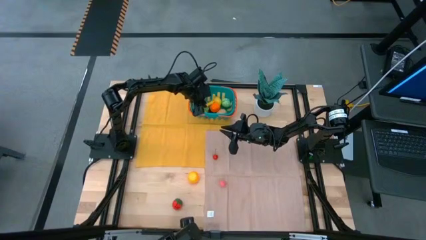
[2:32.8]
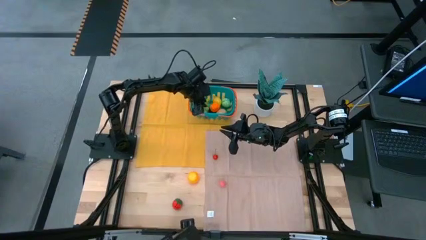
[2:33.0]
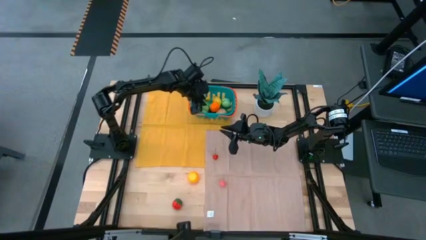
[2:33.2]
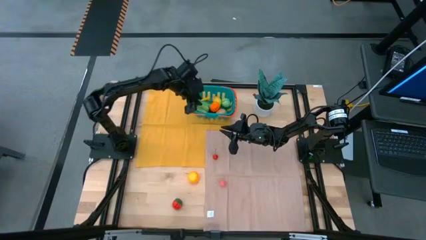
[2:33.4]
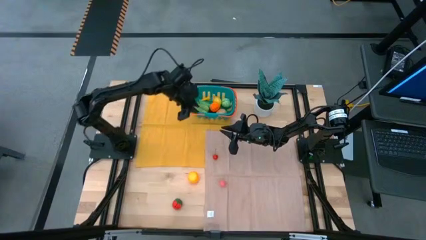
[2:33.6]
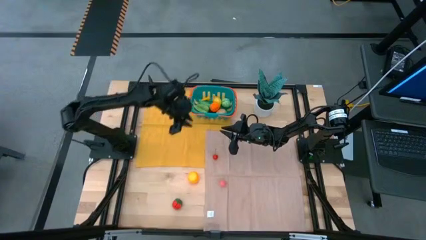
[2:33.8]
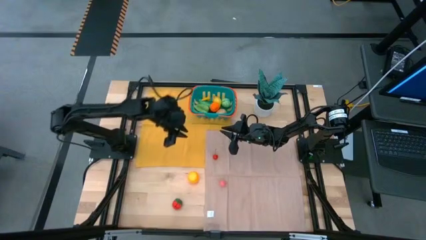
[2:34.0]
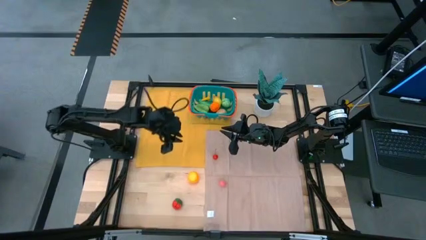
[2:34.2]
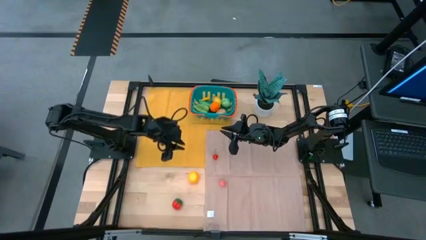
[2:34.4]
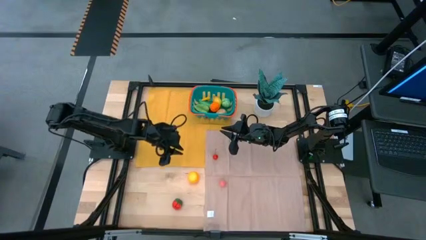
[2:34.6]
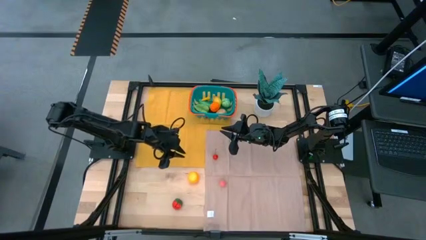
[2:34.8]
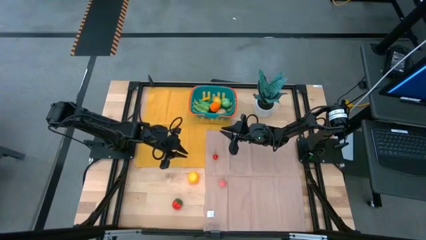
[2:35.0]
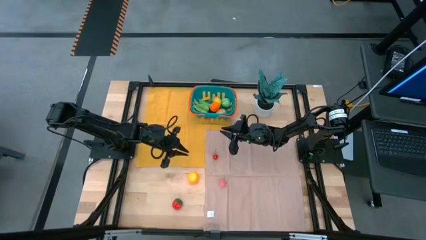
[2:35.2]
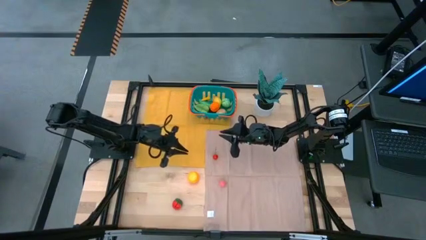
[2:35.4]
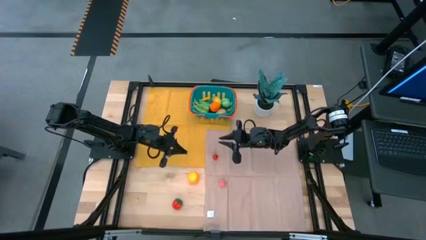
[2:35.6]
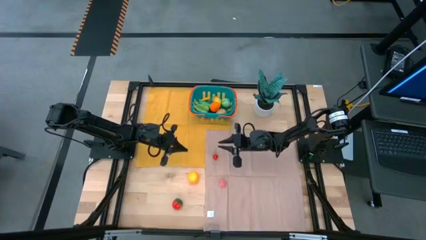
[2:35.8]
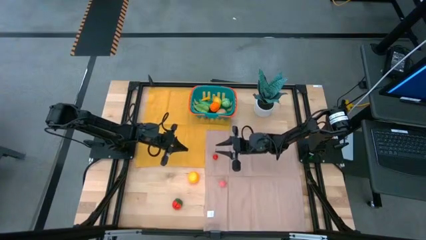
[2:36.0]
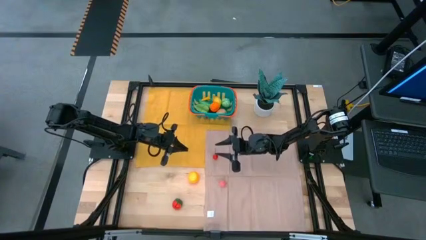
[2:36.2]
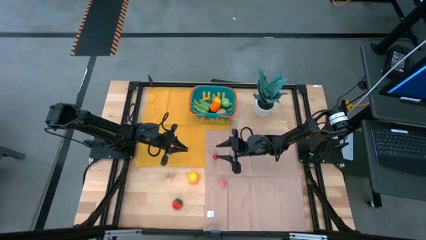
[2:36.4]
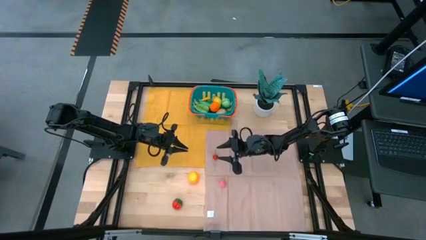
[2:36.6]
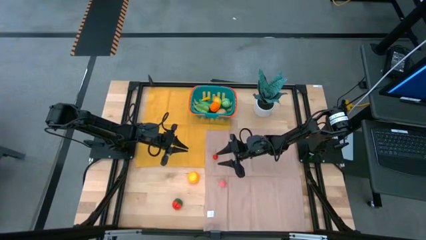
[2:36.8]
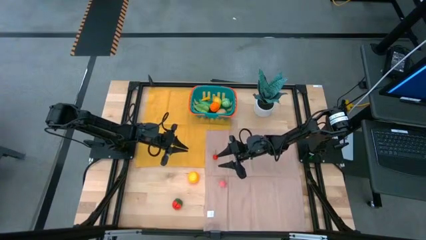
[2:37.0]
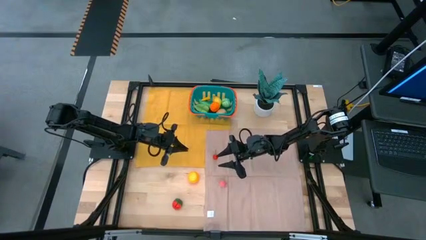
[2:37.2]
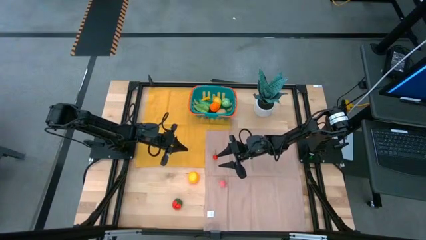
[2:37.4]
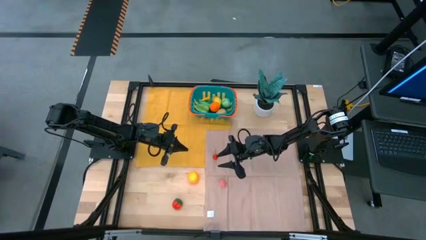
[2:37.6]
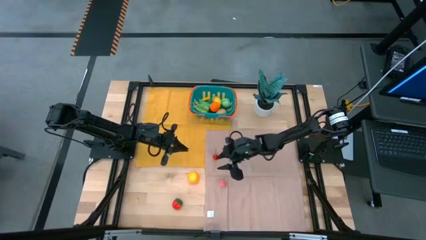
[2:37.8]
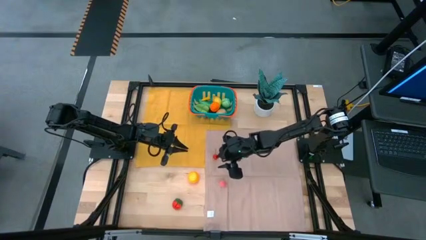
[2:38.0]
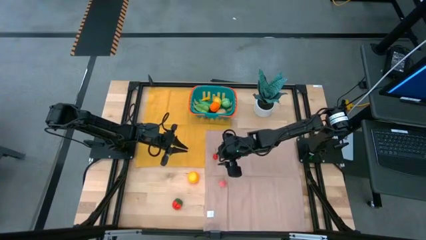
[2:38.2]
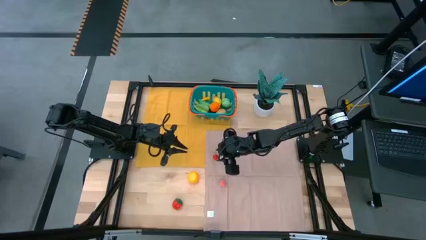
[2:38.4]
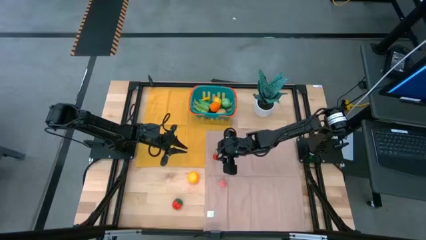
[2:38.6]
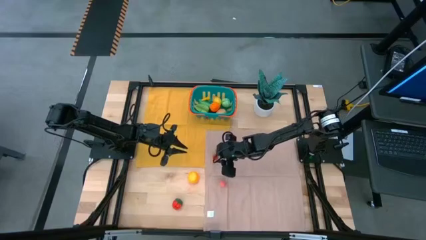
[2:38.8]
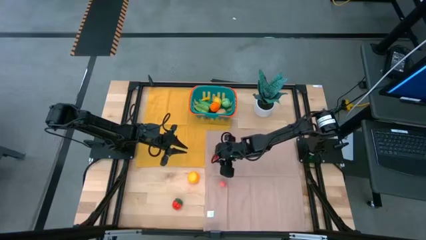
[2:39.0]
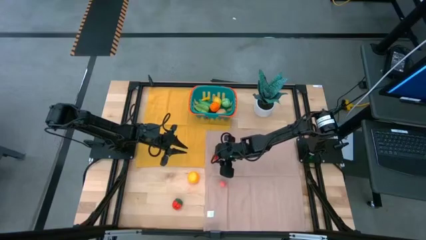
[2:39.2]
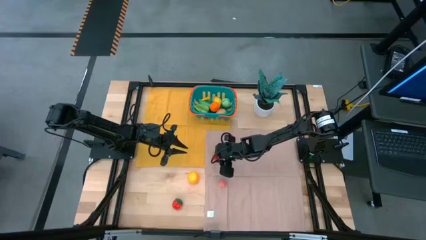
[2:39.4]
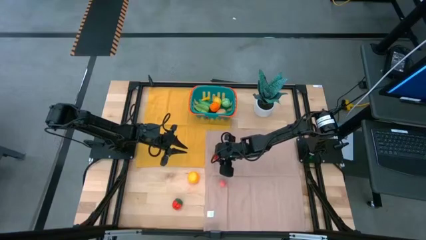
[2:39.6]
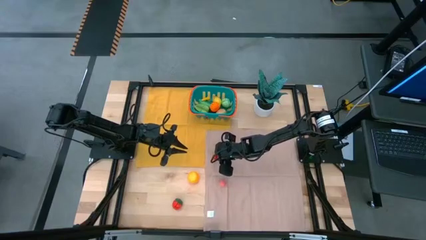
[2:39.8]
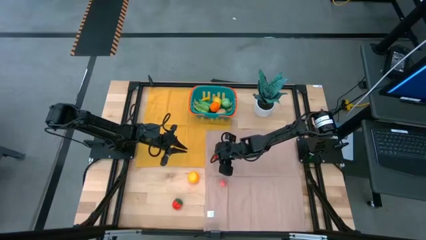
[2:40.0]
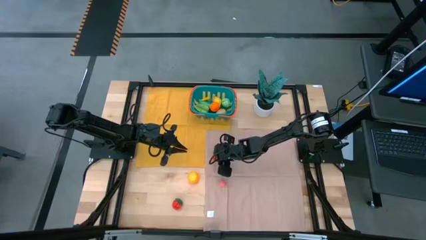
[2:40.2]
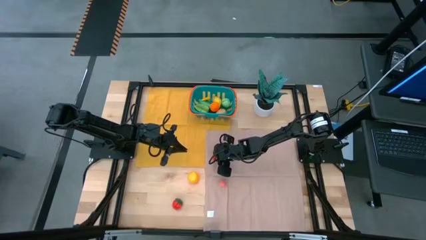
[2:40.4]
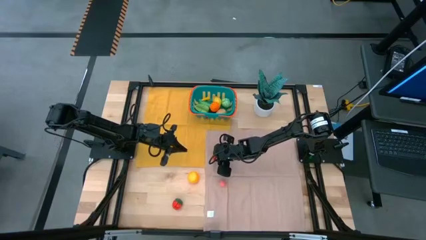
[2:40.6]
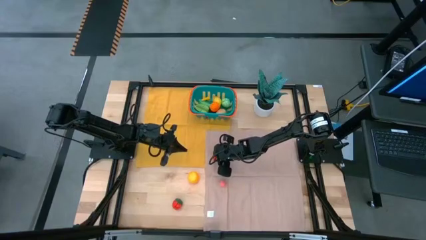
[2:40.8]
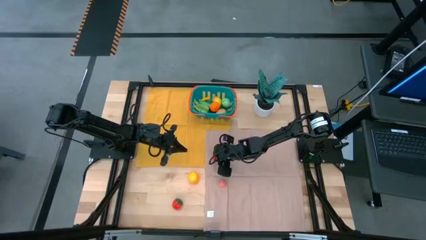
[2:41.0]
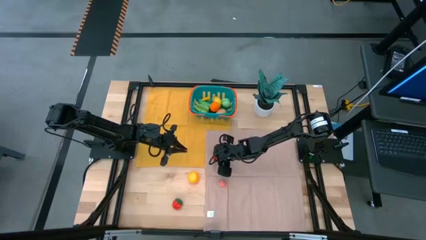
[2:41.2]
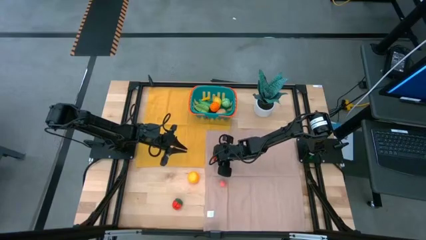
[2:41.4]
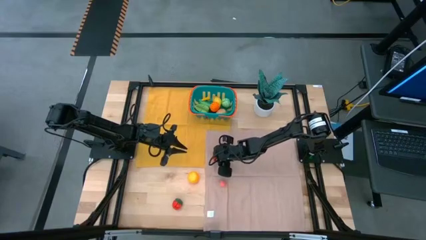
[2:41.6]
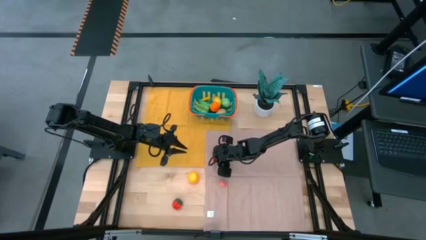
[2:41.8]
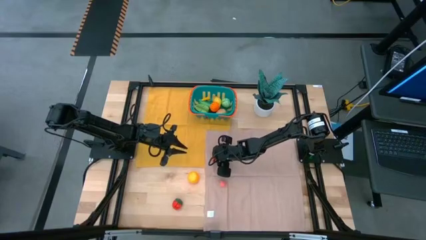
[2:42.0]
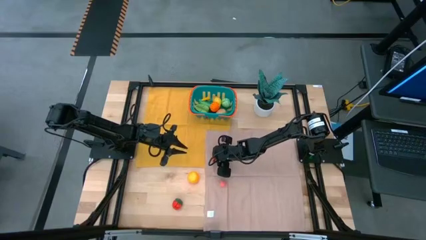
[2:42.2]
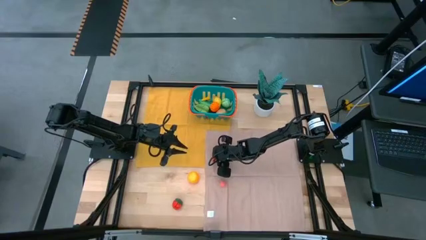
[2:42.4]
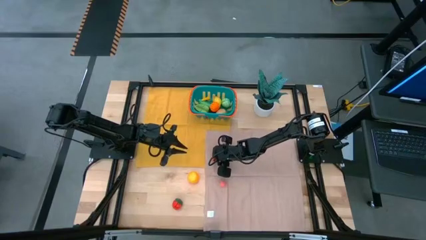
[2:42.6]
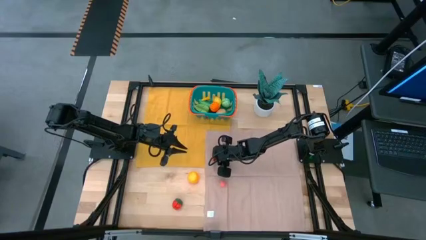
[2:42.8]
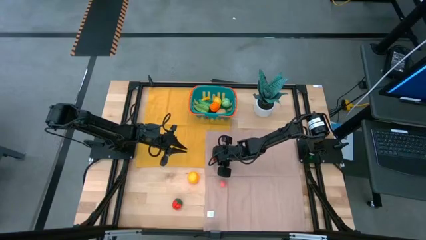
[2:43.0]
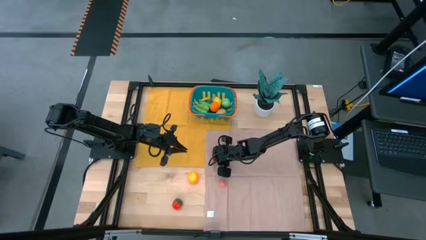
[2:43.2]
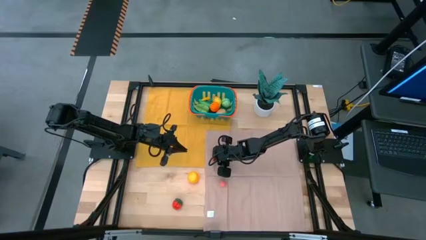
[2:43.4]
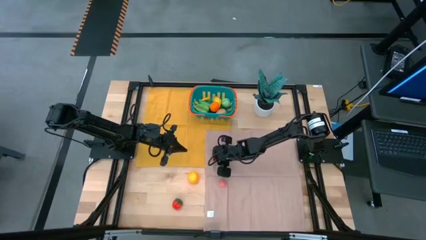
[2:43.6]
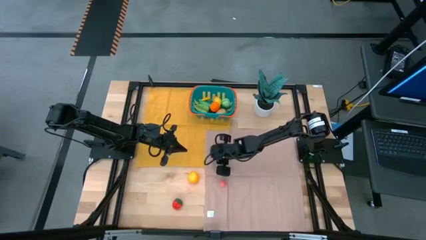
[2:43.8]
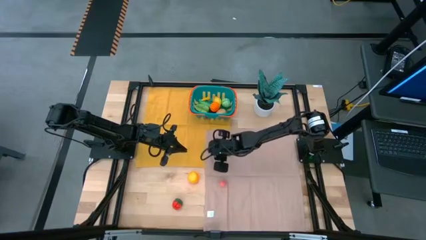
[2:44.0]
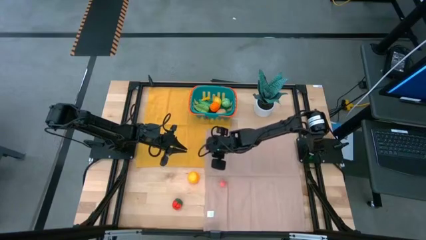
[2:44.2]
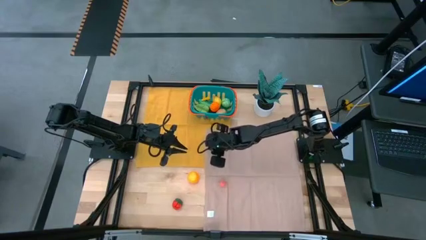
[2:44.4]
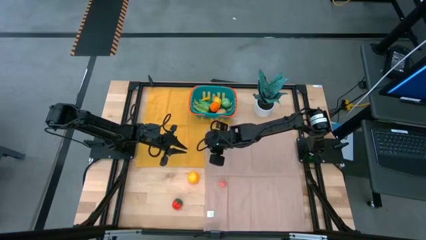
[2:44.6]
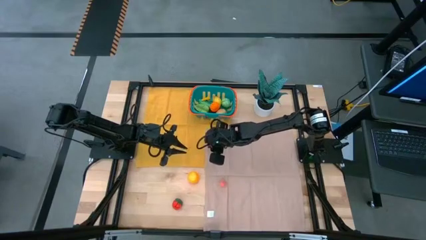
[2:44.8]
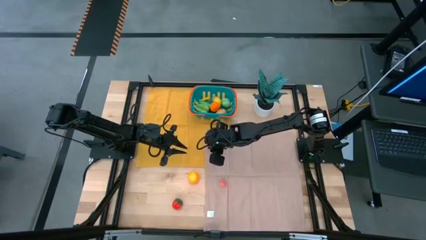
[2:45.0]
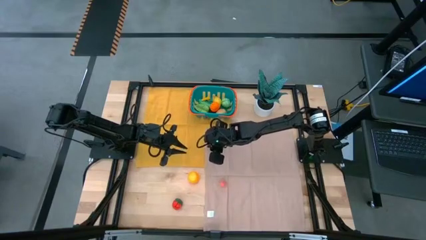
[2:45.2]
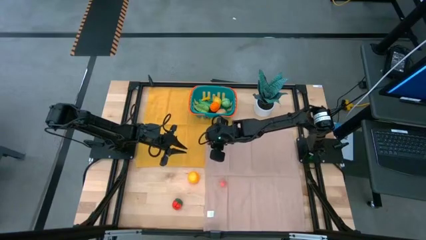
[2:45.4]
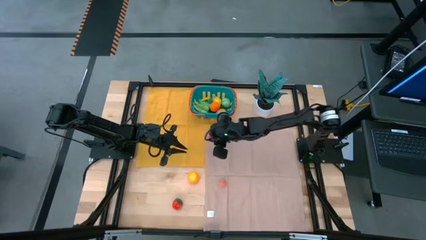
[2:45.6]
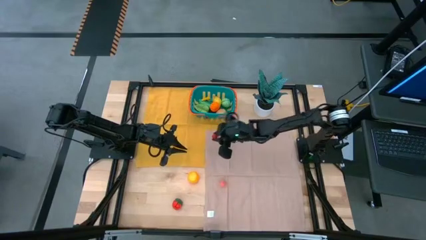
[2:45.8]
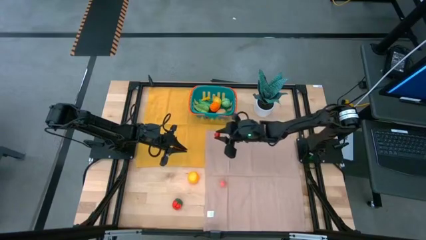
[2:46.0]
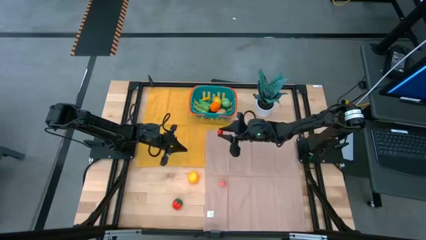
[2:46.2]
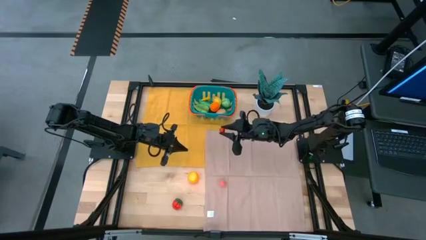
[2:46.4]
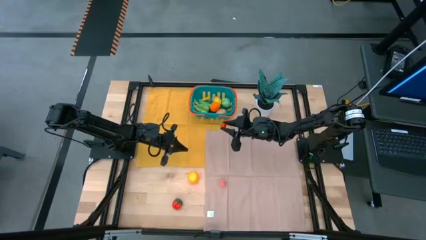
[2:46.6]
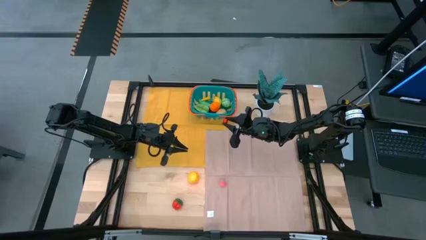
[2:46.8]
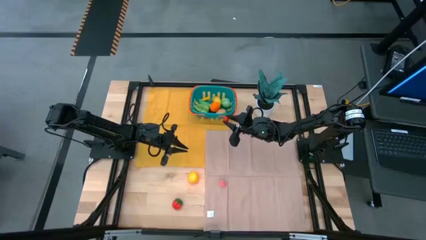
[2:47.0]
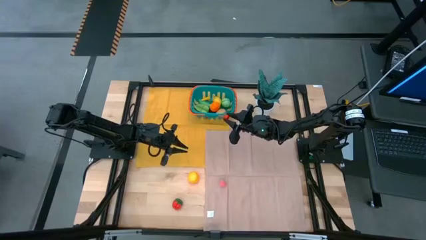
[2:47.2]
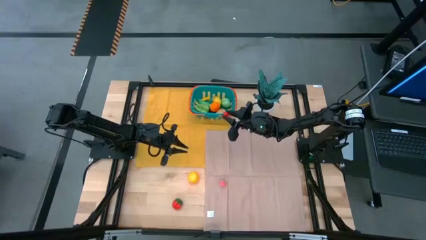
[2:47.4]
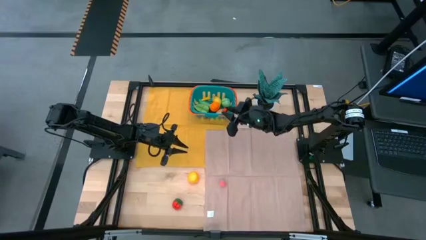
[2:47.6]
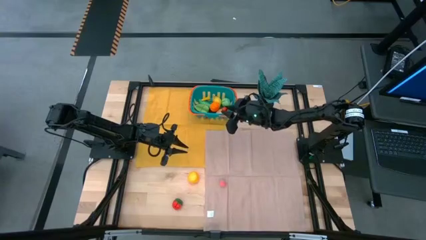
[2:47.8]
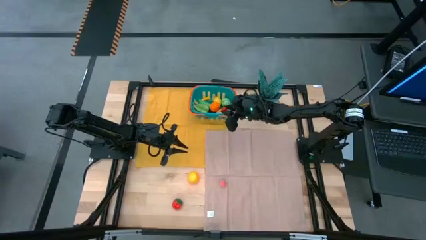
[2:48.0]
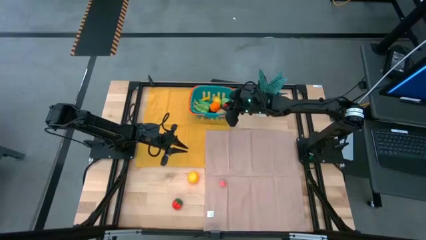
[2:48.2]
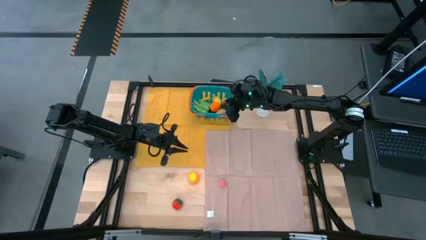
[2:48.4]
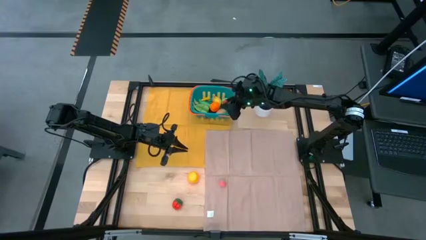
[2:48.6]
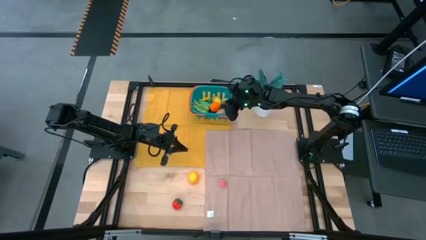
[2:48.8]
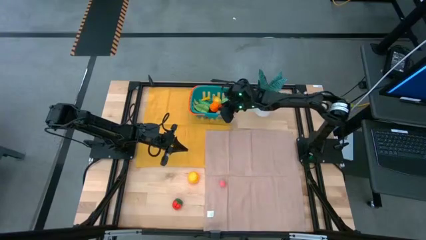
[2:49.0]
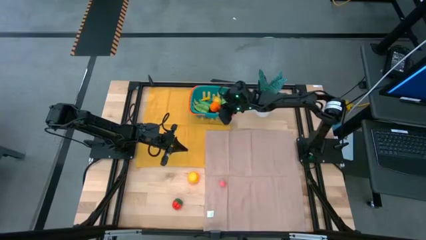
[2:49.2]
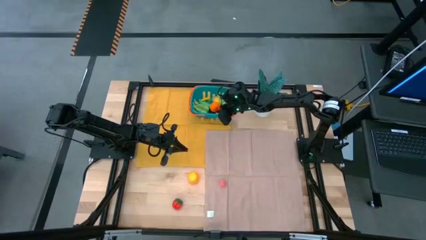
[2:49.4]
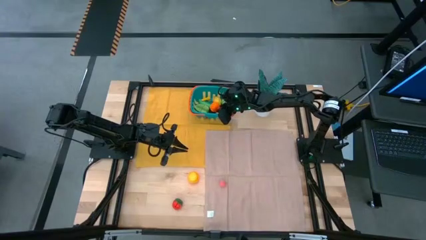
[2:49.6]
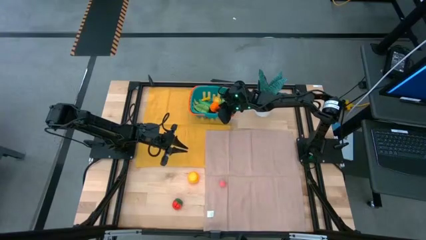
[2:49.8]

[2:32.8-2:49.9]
Task: Pick and placing Produce into tupperware
Put the red cherry into the blue basket
